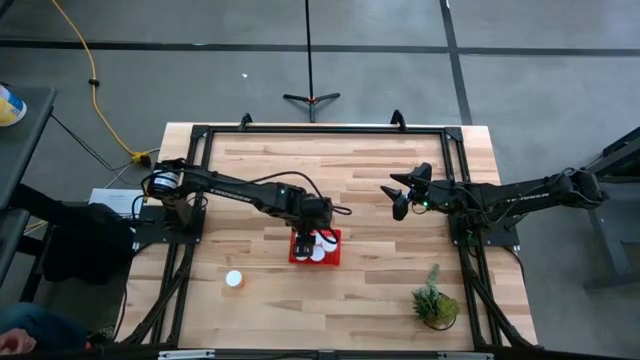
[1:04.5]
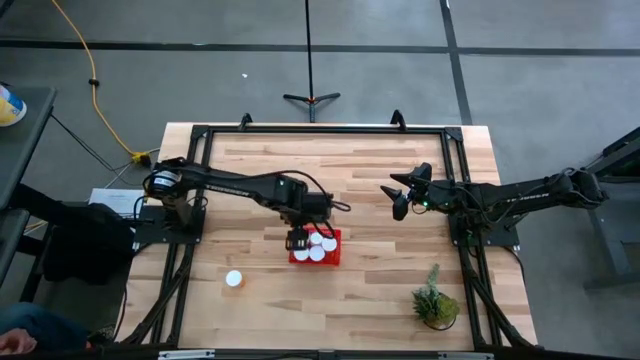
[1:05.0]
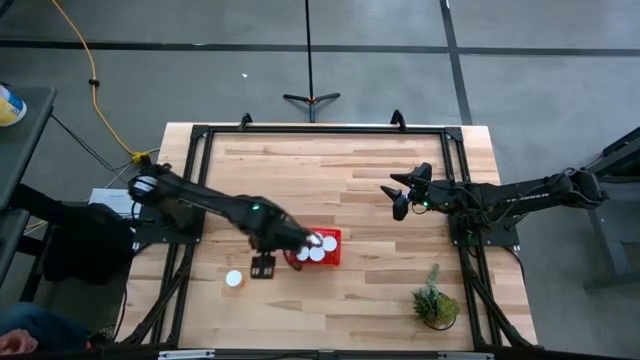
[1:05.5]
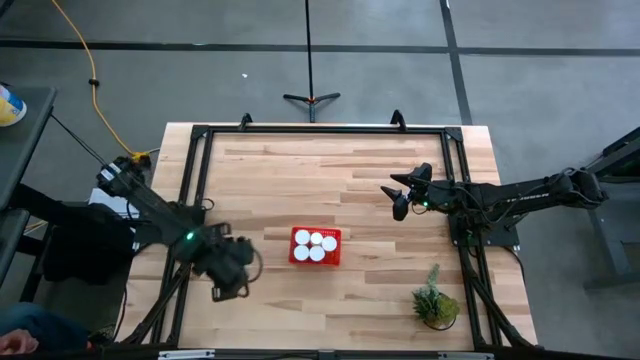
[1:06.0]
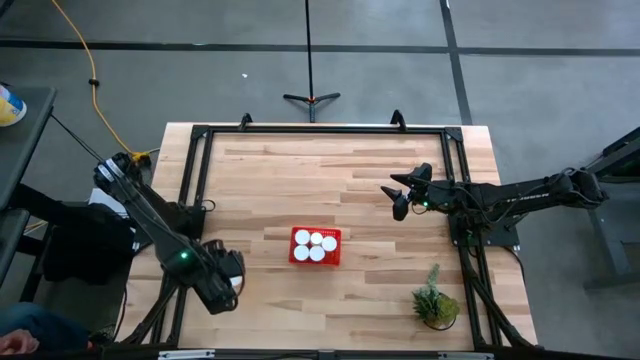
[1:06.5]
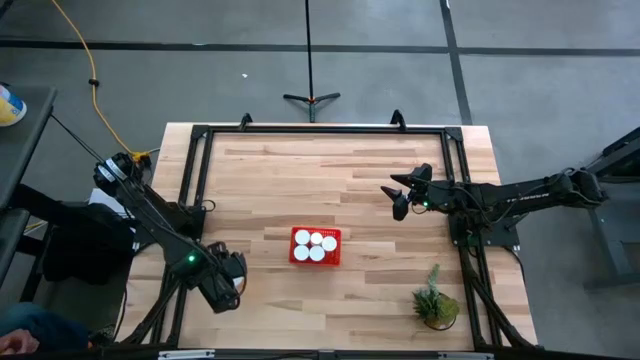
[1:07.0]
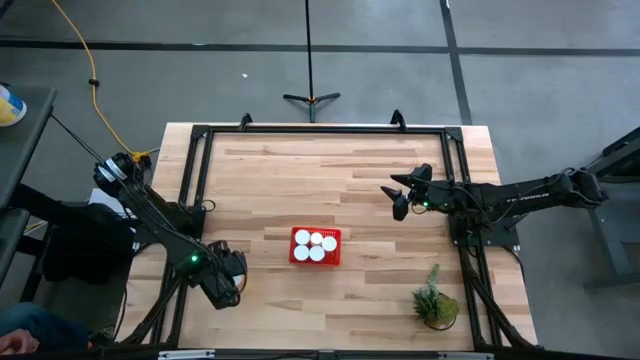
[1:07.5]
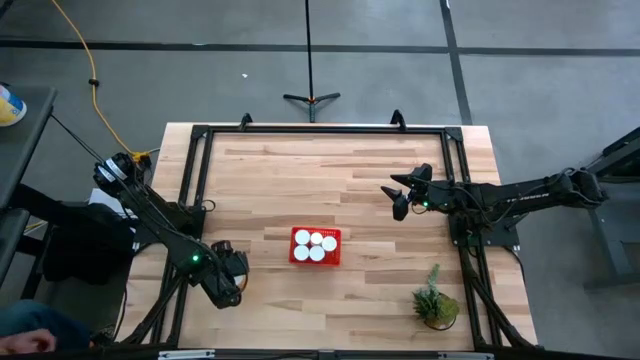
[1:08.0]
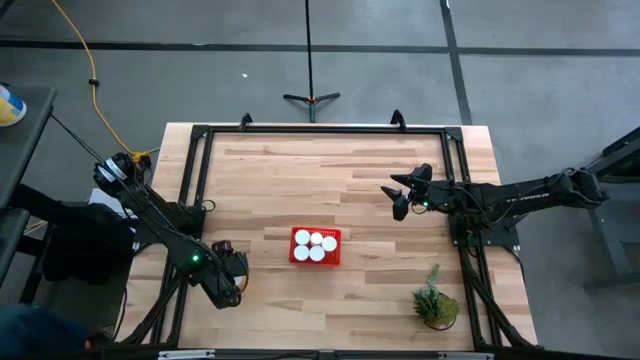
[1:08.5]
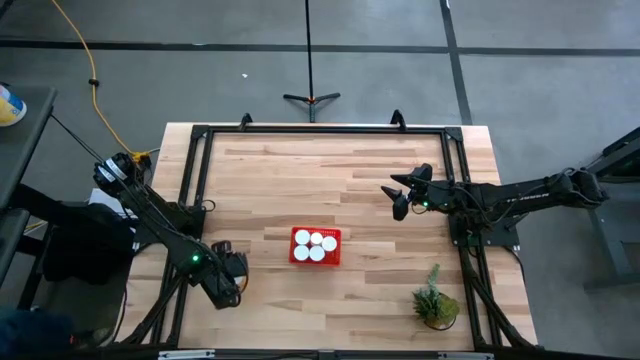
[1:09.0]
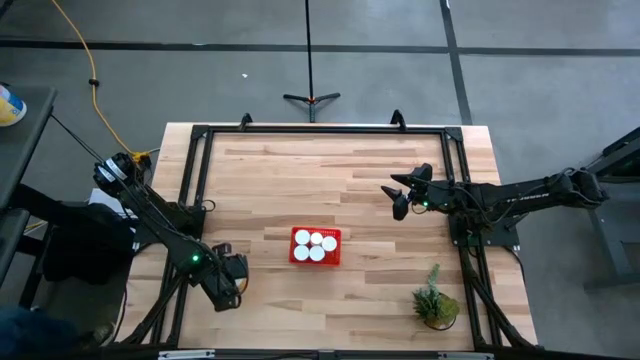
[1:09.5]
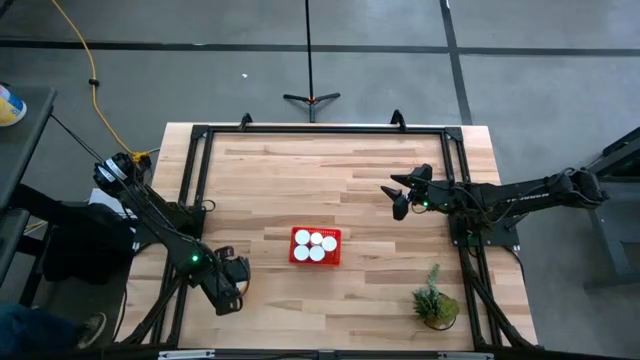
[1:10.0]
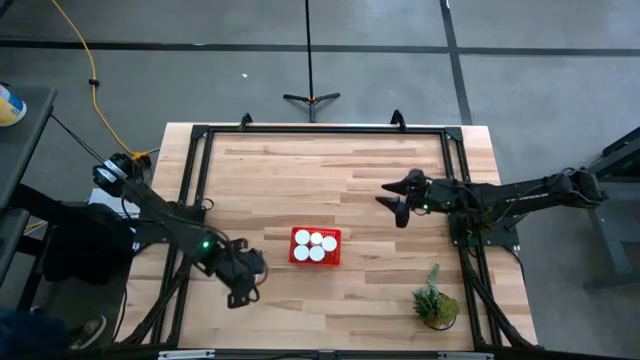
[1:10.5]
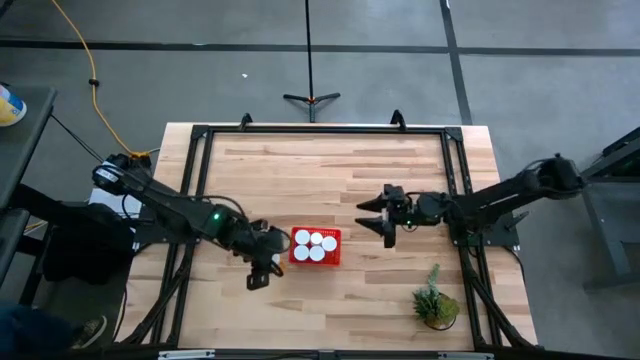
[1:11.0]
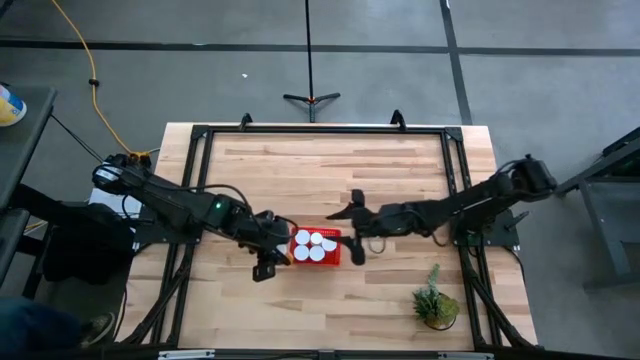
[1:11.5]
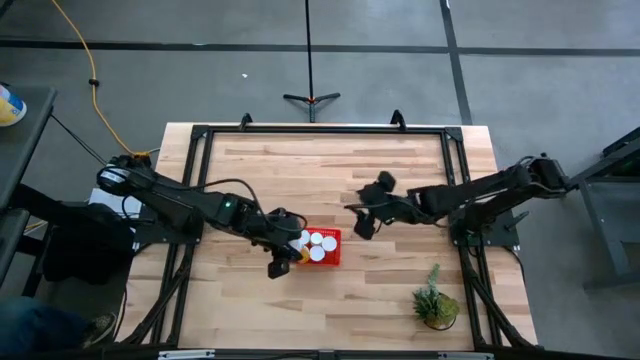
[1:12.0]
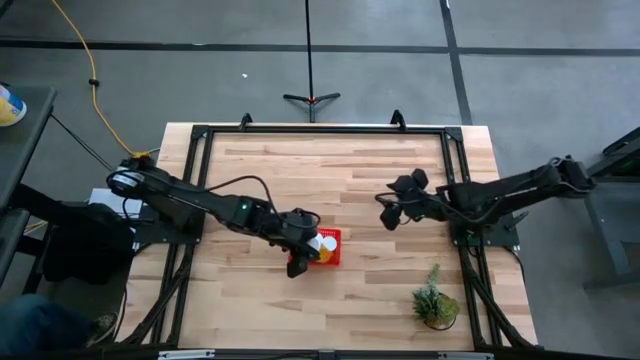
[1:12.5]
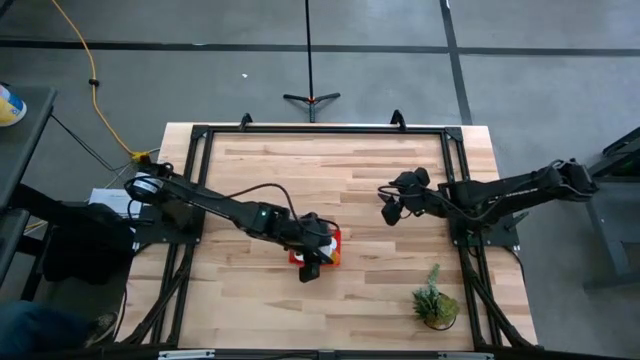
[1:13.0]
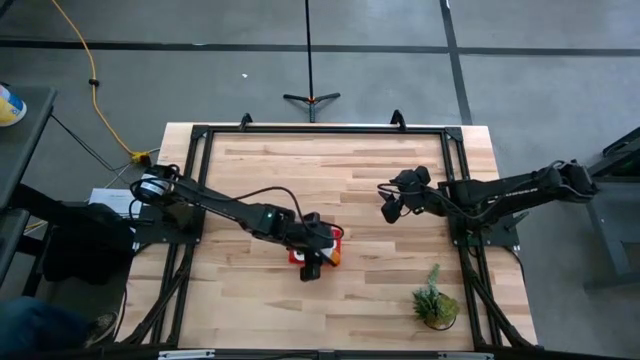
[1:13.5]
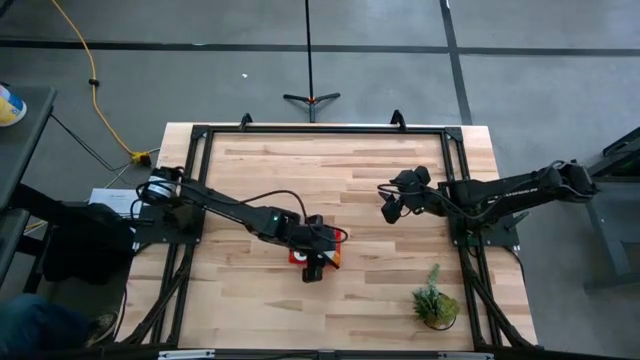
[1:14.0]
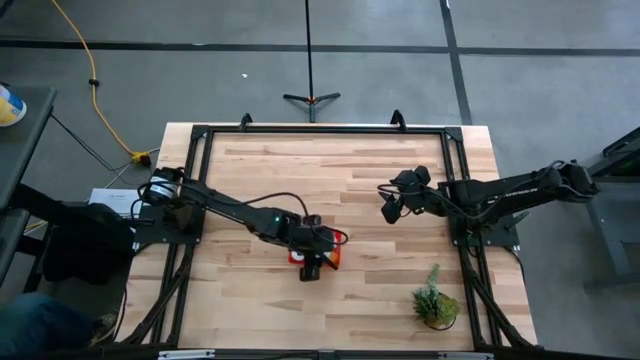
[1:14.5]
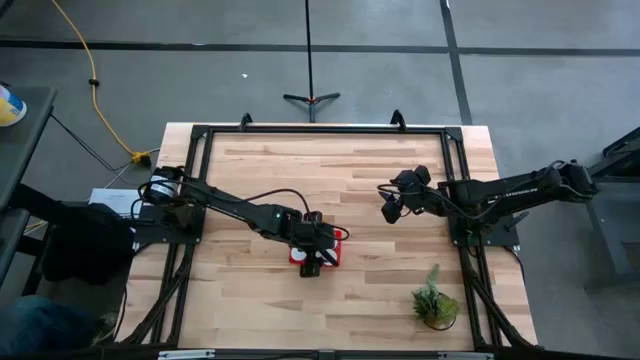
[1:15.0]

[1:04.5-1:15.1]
Task: Pick and place pill bottles into a basket
Put the orange pill bottle into the red bin

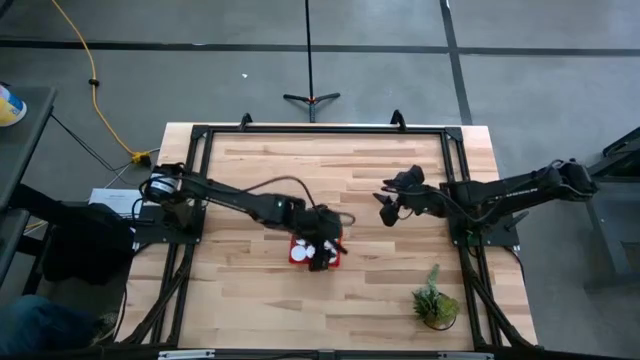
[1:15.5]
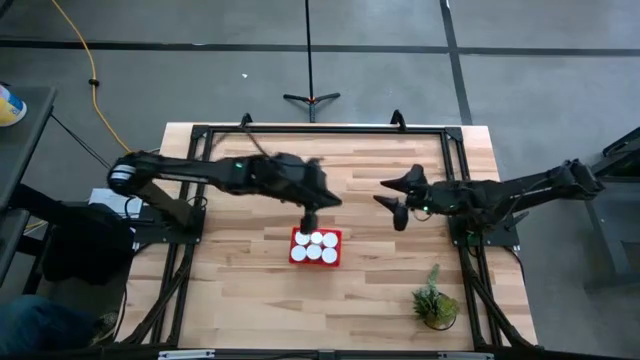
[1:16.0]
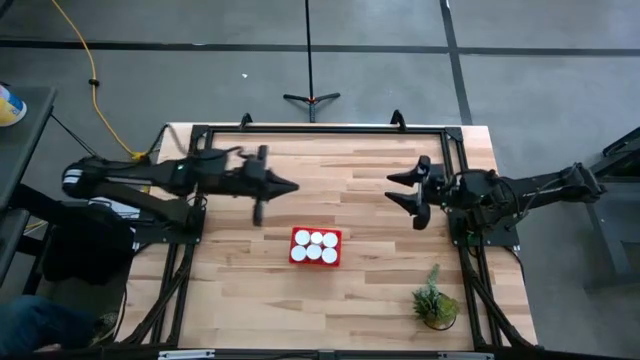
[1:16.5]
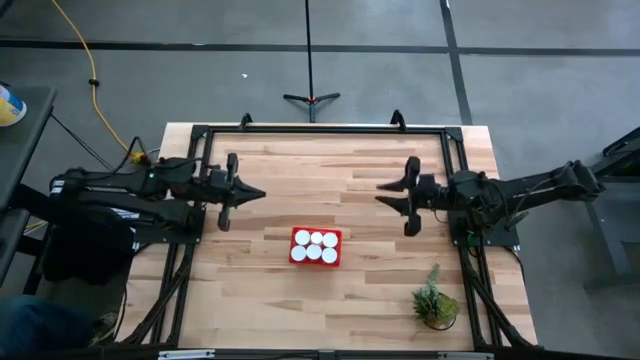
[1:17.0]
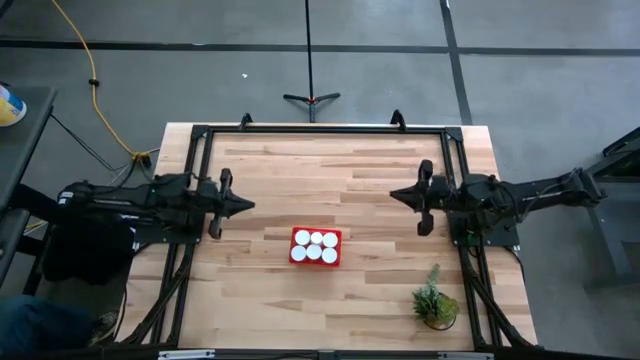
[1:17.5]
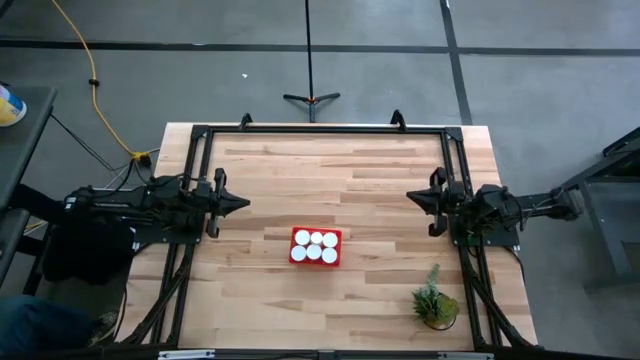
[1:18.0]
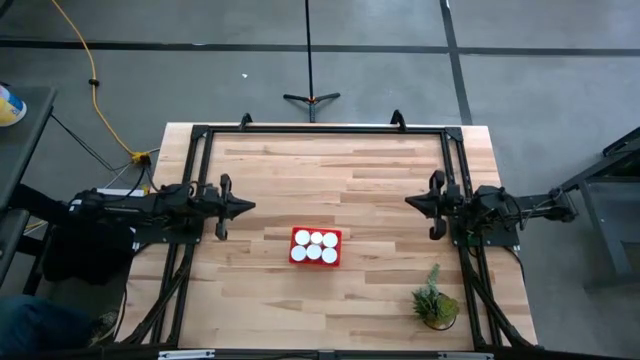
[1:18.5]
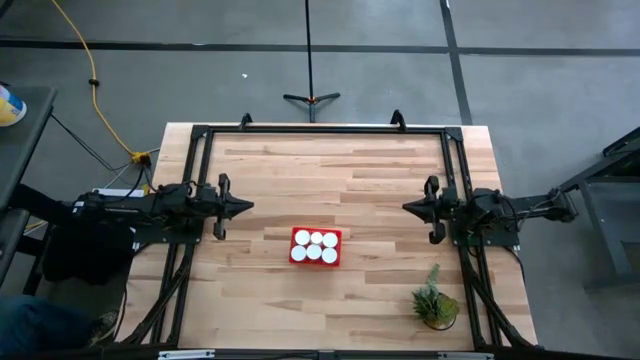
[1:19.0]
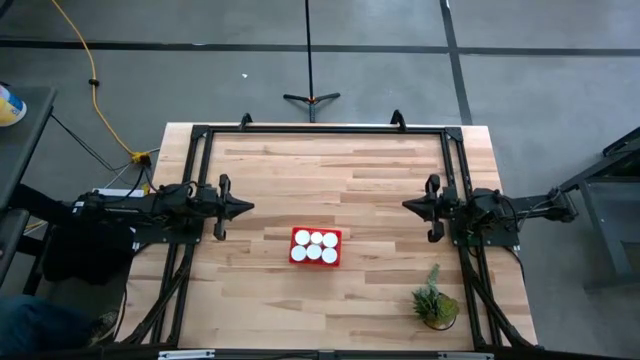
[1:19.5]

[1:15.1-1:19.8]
Return to Home Position

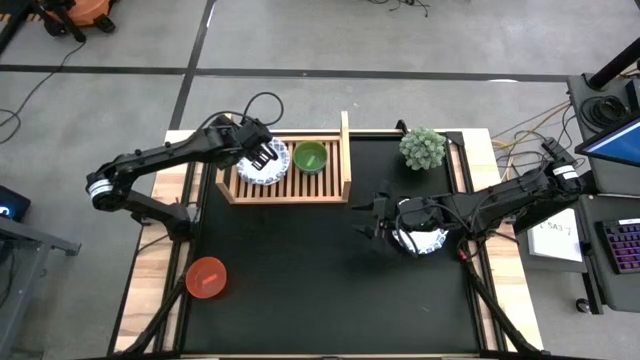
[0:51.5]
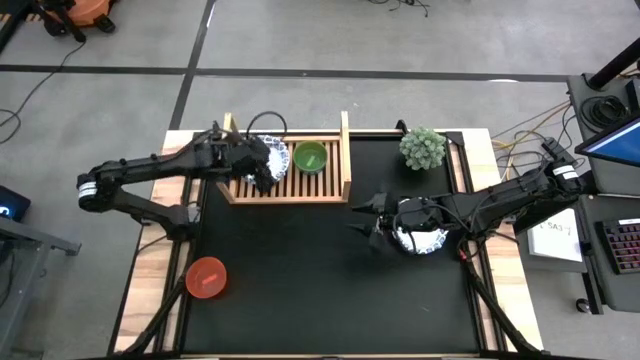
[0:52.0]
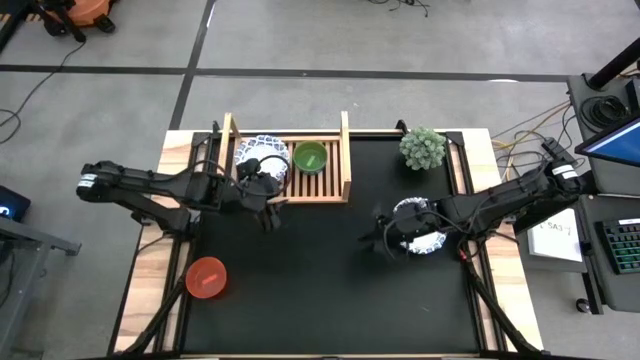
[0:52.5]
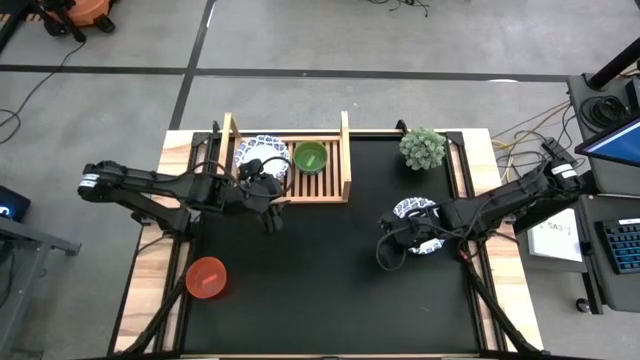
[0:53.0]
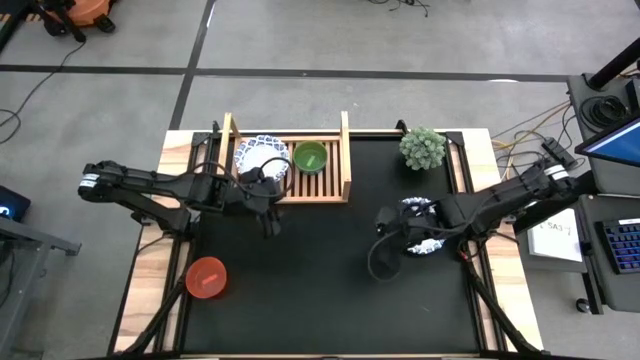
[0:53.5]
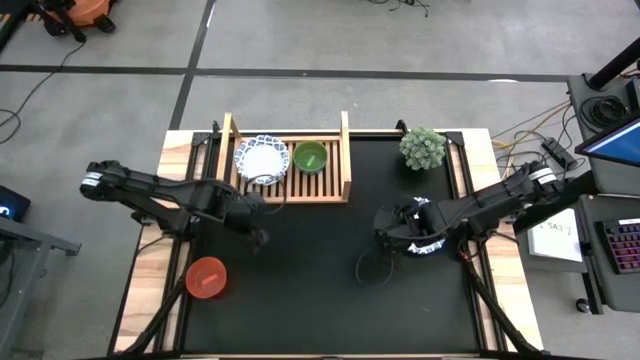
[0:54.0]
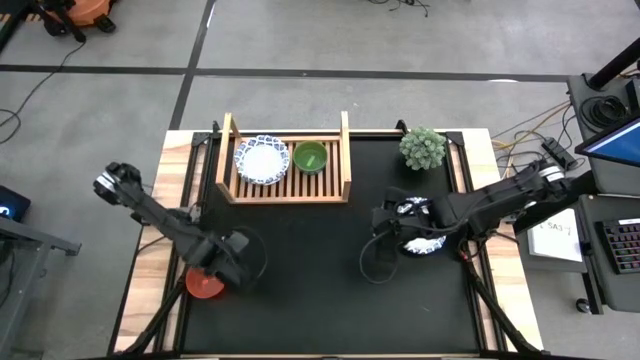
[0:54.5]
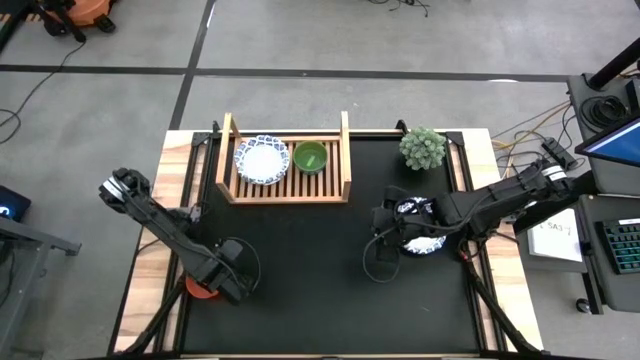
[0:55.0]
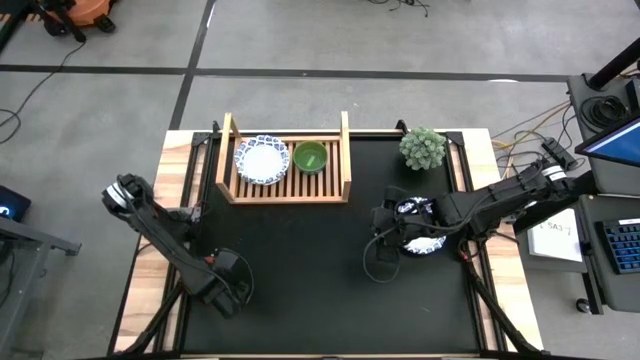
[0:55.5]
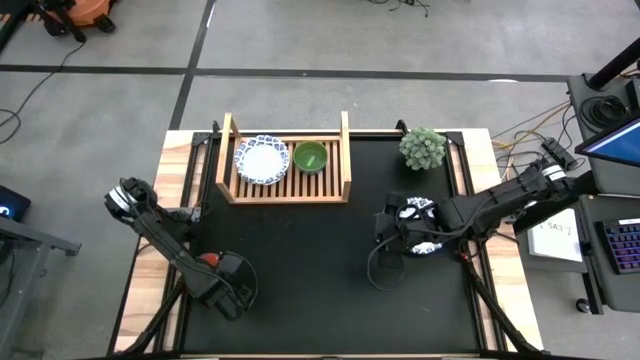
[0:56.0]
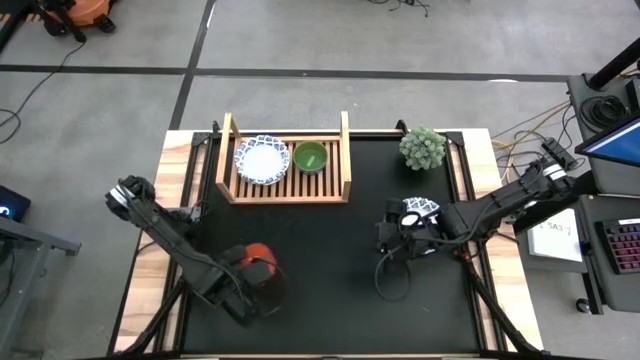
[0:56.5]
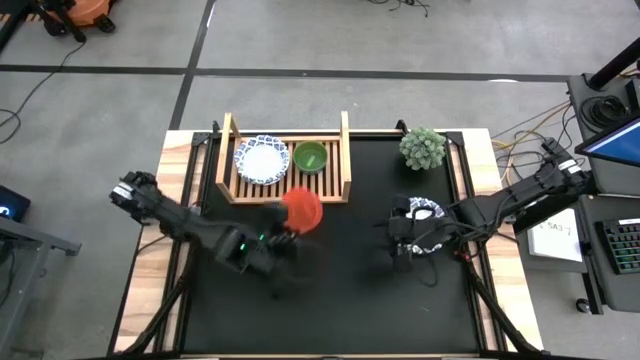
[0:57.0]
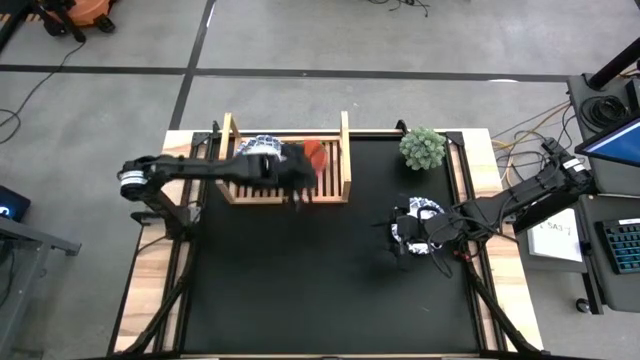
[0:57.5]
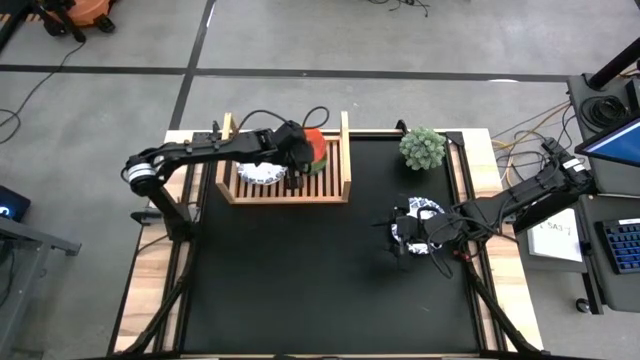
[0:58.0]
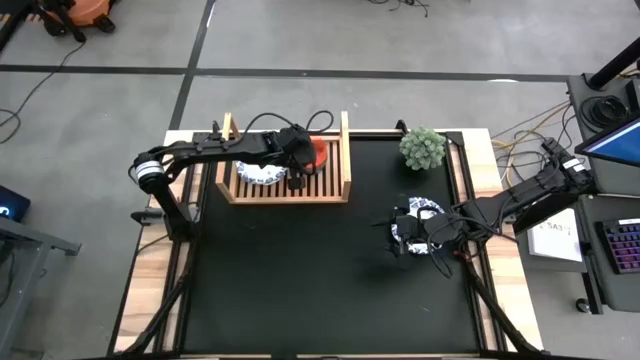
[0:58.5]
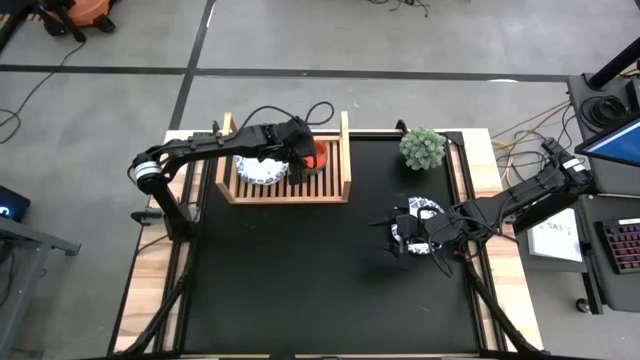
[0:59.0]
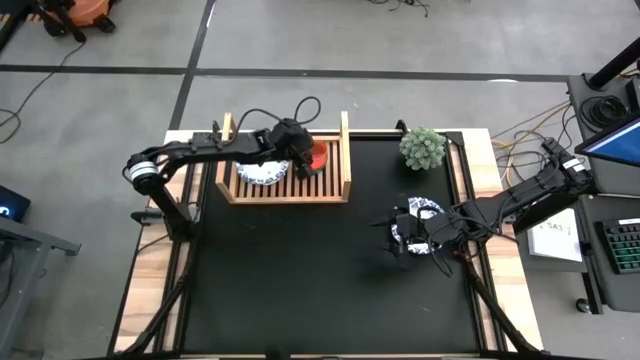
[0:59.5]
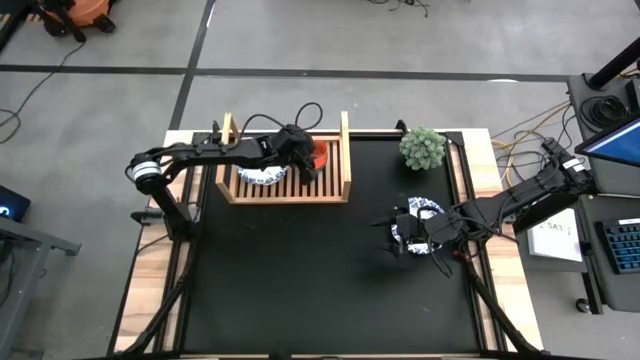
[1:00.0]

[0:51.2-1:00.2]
Task: Place and stack bowls onto a shelf
Stack the orange bowl on top of the green bowl on the shelf
